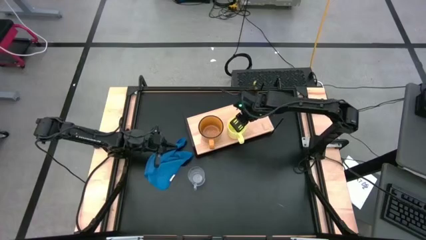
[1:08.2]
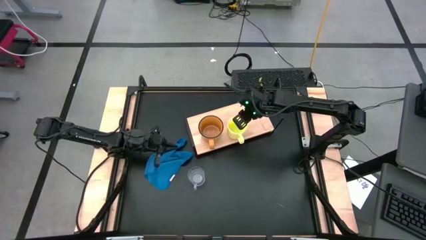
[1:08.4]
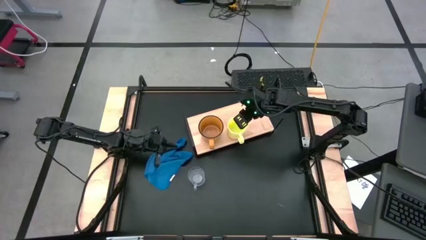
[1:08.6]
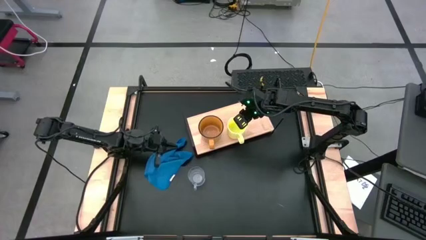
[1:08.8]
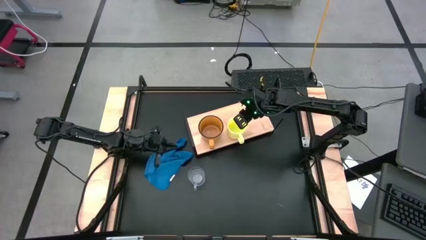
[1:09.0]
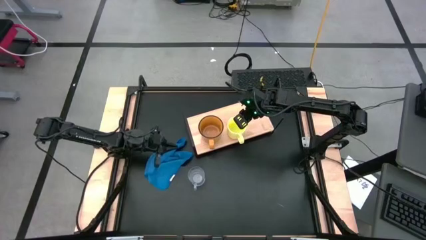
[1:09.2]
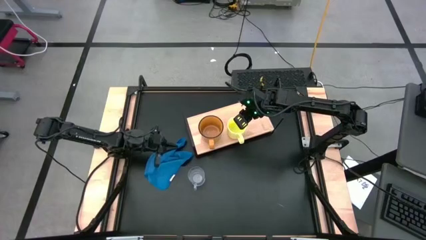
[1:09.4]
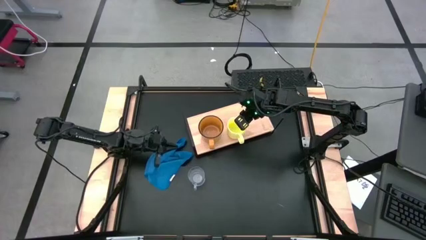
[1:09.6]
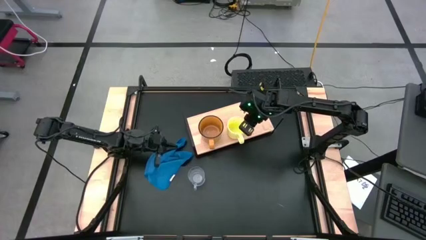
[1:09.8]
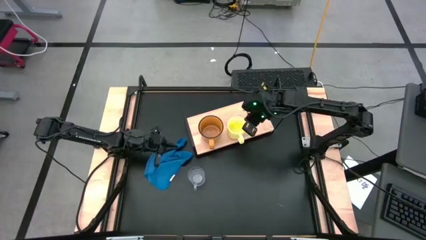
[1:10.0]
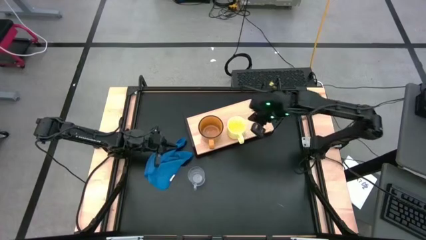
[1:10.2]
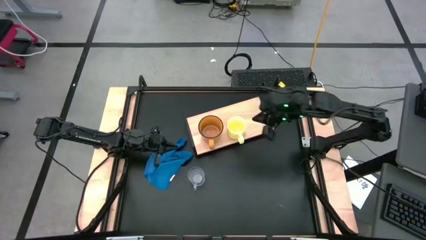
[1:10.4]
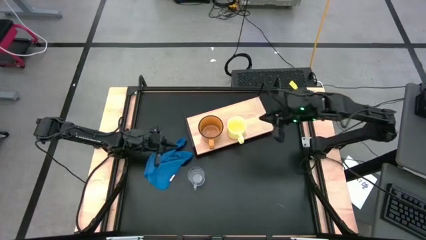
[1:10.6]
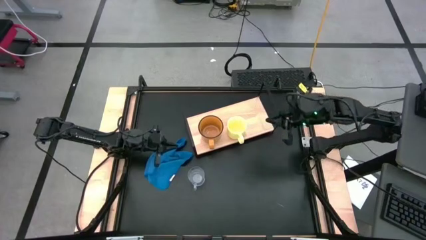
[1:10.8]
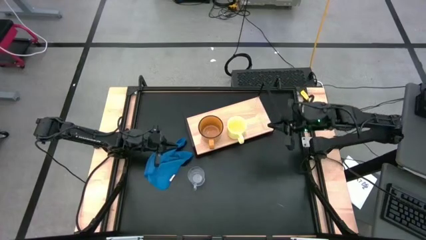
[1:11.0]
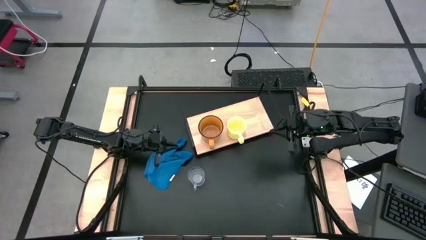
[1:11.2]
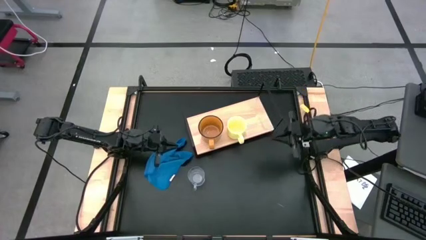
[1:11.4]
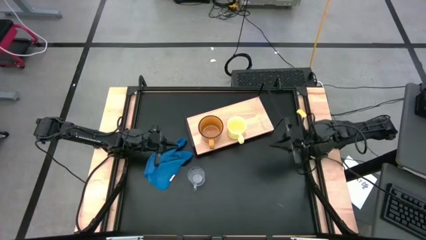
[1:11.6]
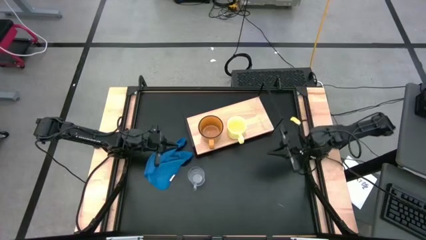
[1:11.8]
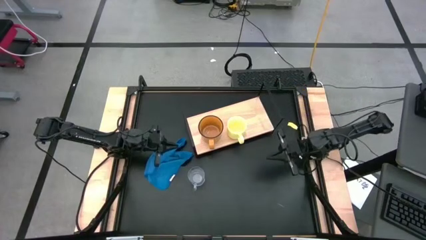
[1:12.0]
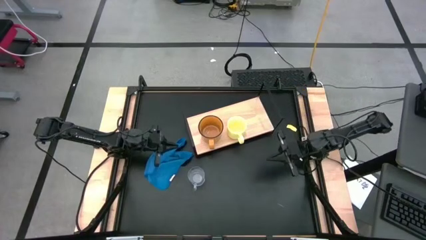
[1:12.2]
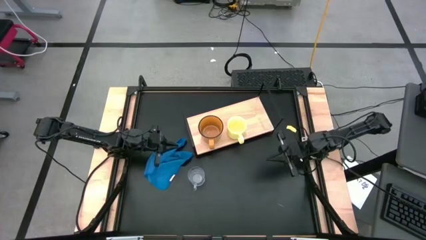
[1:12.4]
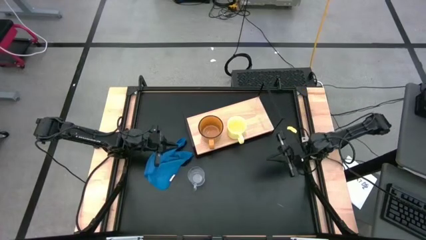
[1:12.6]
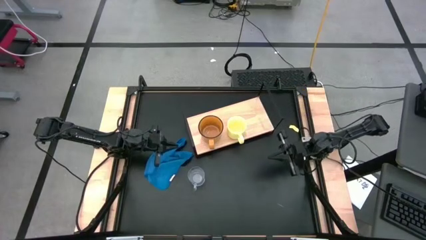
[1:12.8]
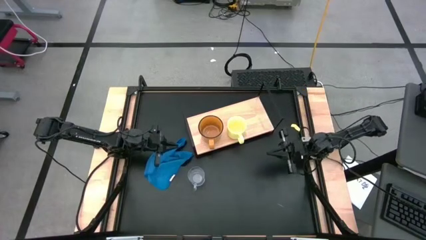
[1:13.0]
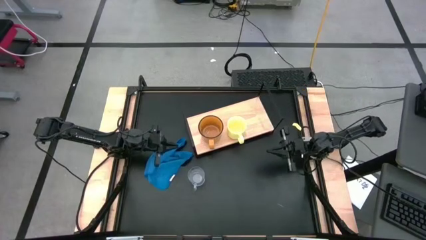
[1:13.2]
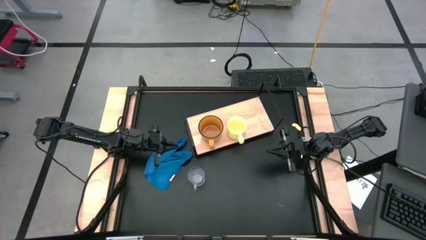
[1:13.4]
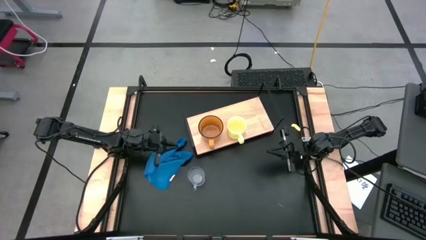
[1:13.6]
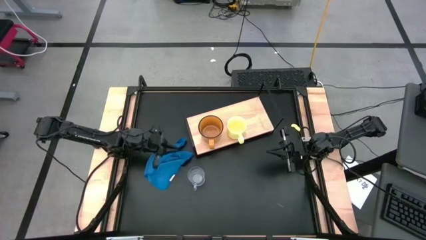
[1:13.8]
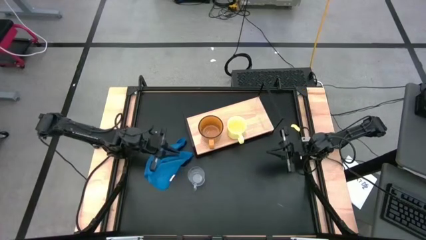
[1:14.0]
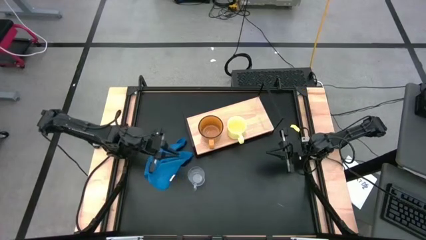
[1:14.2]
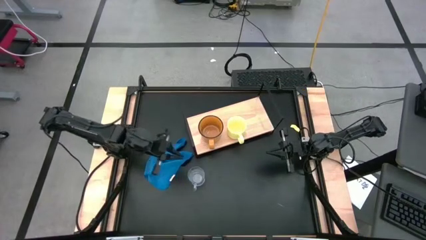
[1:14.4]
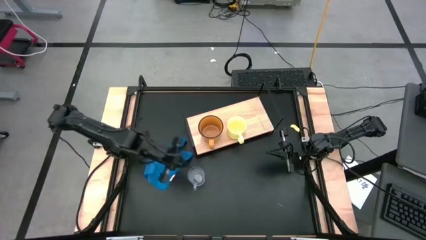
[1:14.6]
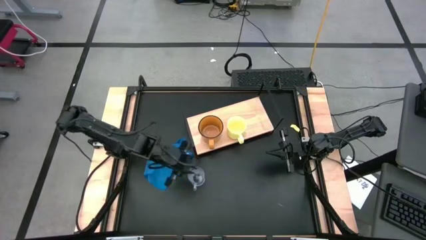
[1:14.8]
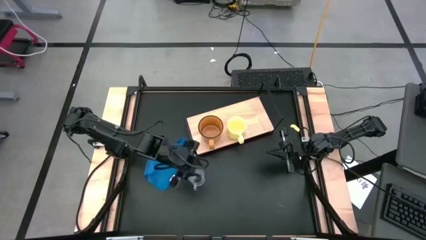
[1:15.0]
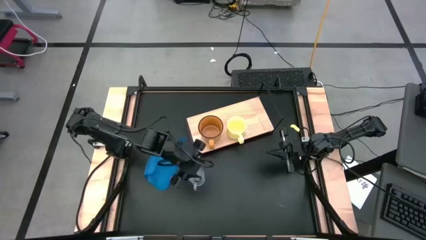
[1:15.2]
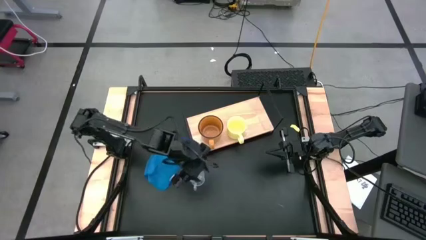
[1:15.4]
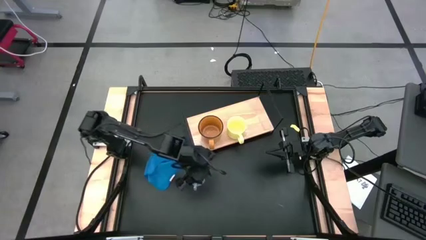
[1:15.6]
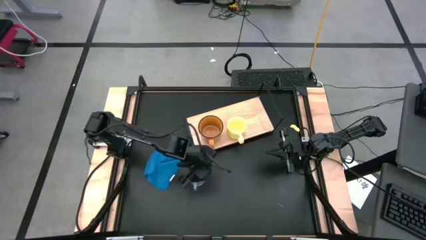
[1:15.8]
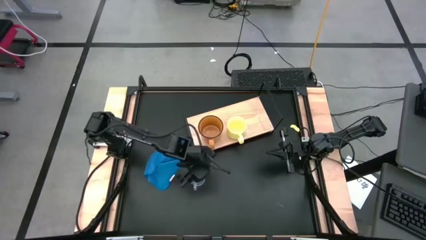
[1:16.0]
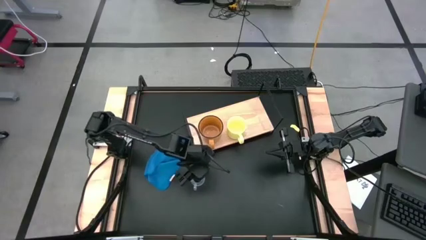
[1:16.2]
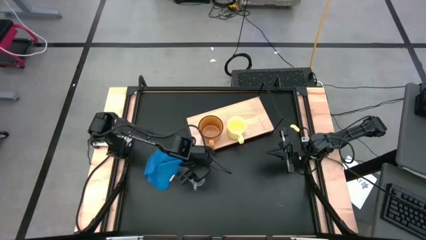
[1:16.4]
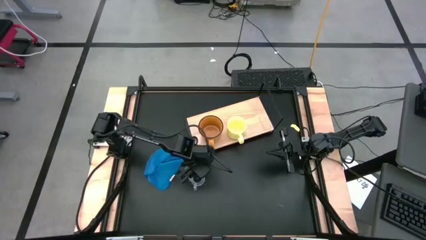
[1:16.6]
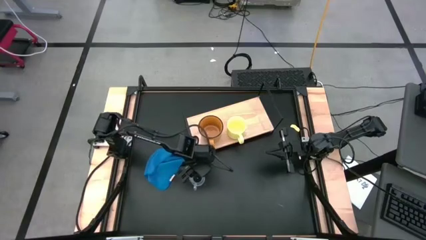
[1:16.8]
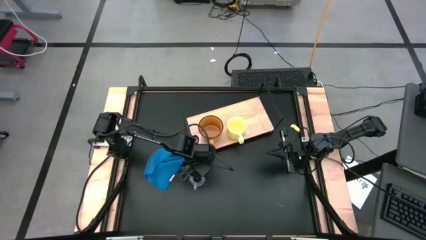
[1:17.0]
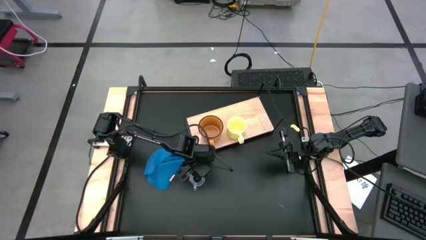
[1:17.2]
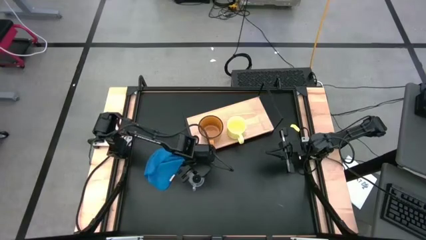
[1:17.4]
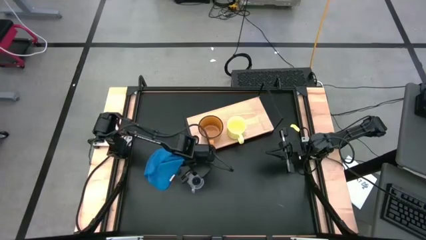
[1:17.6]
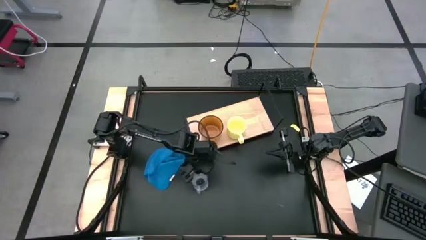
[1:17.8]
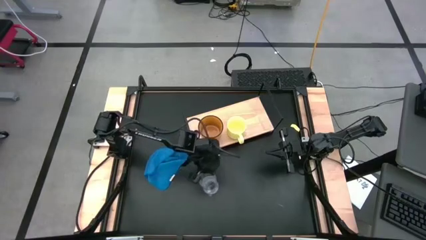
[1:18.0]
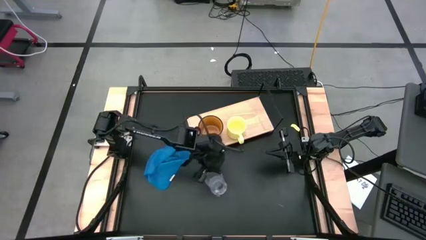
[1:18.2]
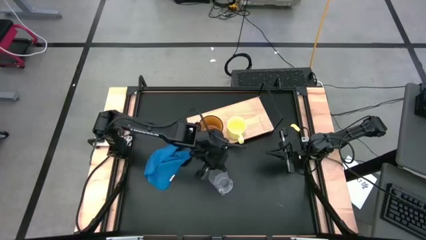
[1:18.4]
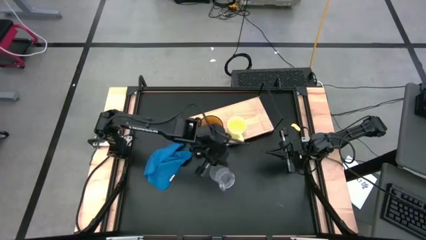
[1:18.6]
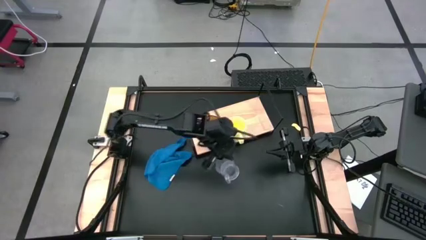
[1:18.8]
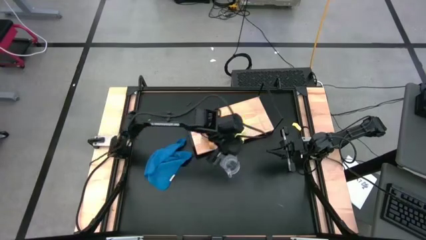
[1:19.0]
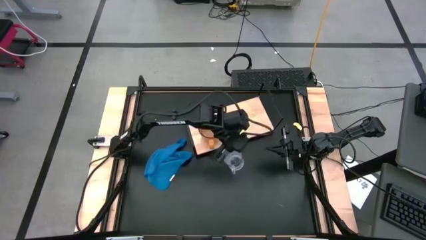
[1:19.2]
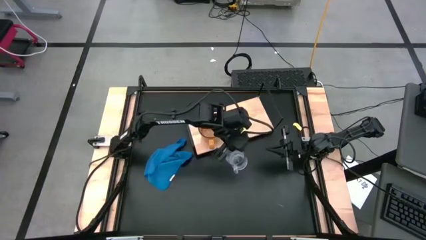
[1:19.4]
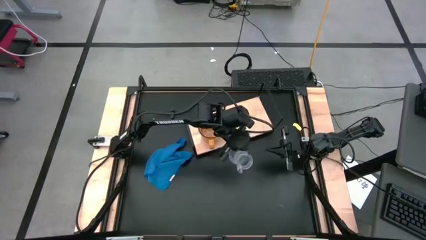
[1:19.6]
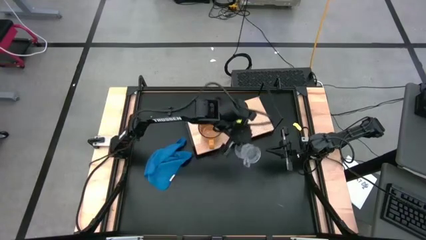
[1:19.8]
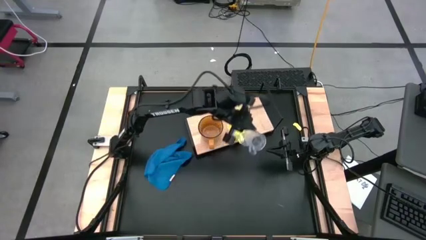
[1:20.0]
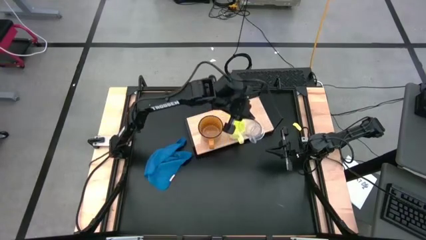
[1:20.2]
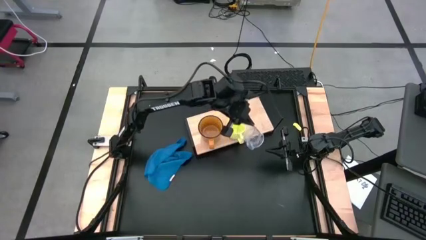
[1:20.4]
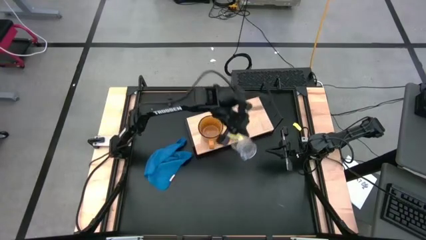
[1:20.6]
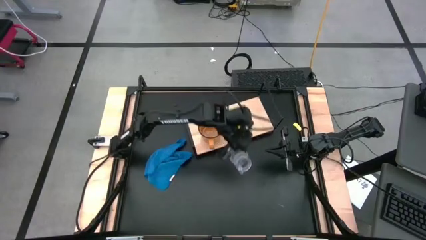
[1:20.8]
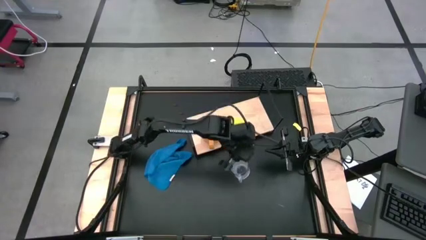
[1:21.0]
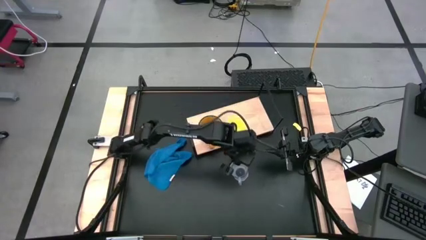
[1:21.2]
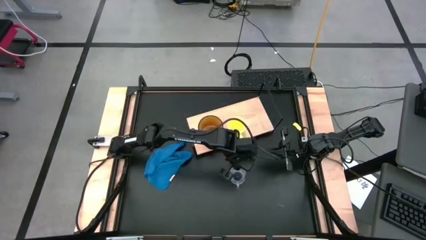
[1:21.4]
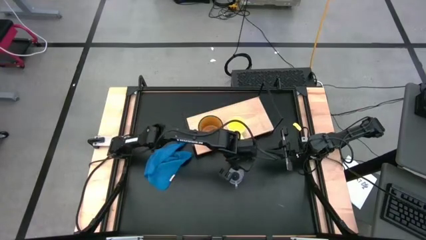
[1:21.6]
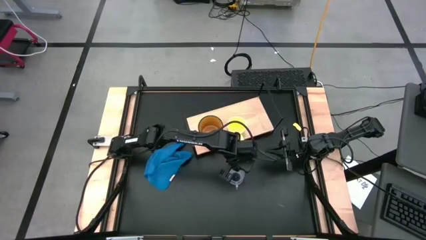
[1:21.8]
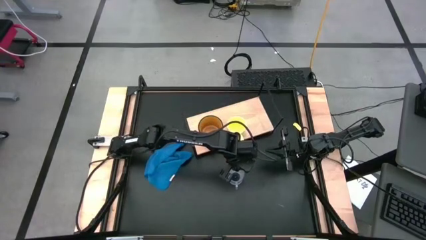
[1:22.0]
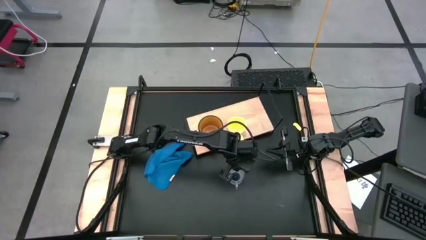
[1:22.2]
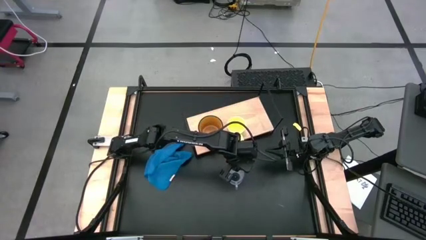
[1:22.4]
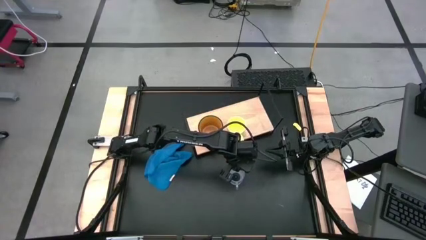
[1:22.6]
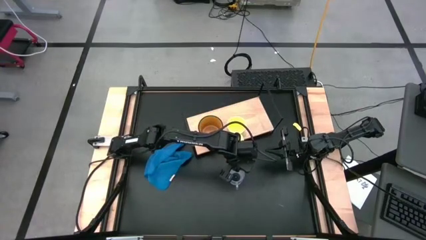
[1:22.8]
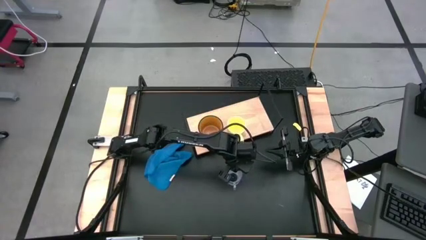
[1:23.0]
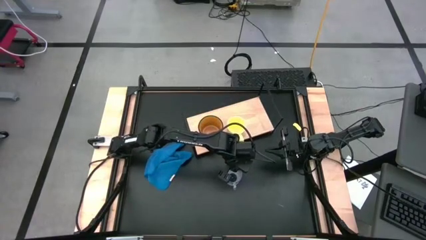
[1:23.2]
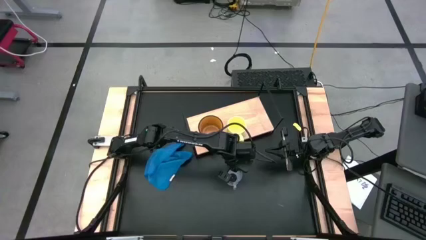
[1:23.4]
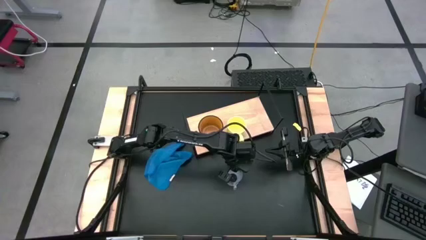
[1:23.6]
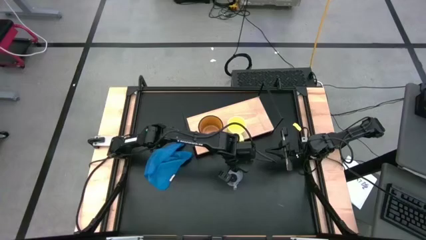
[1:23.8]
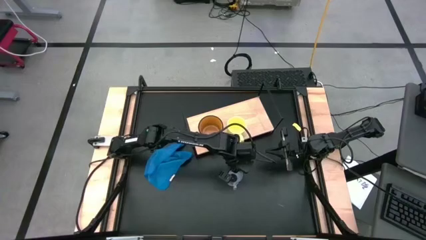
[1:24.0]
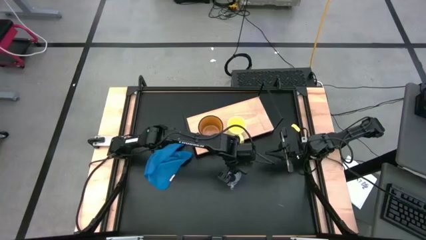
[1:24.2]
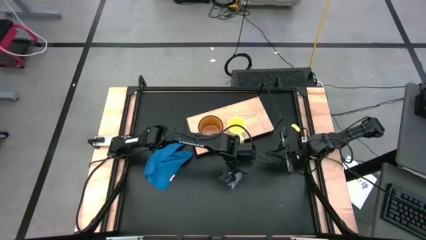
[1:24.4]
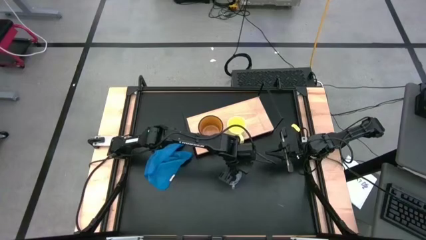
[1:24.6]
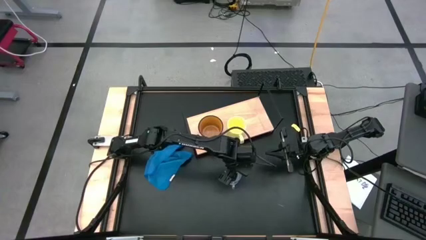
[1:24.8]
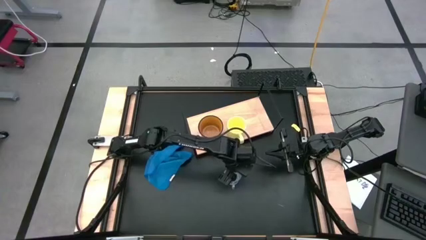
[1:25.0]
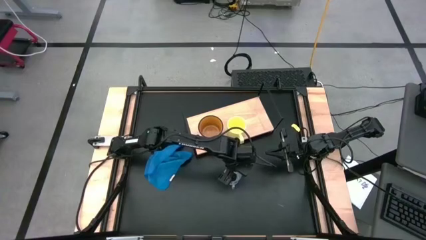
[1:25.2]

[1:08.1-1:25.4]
Task: Stack small to large cups/mugs on shelf
Put the transparent mug on the shelf aligned with the yellow mug
